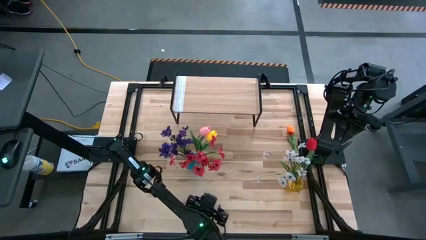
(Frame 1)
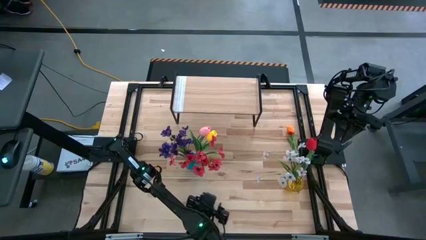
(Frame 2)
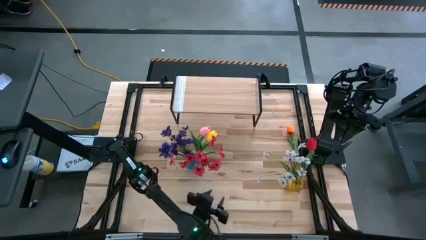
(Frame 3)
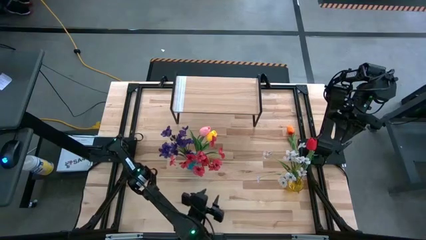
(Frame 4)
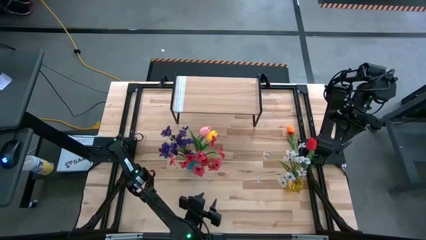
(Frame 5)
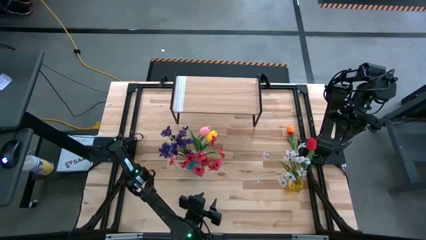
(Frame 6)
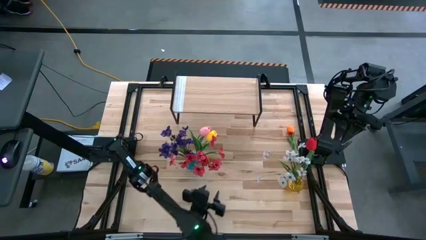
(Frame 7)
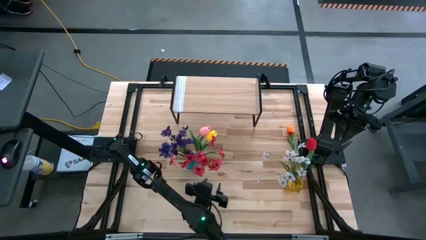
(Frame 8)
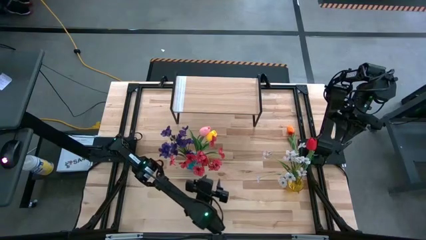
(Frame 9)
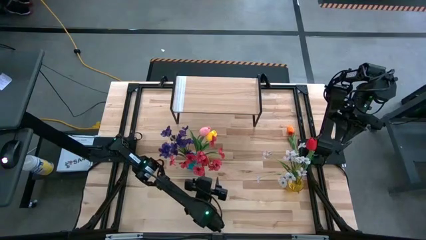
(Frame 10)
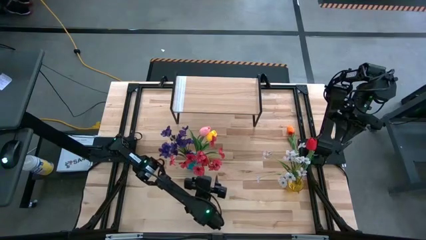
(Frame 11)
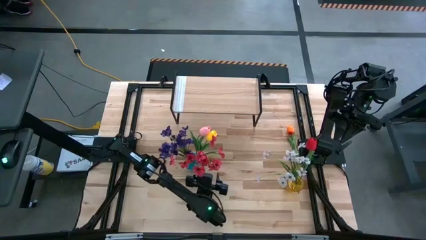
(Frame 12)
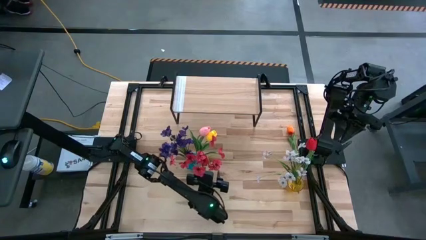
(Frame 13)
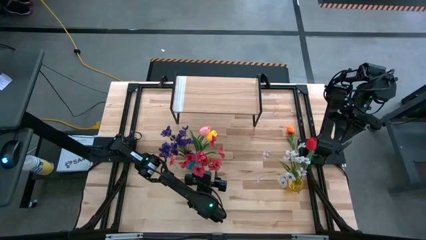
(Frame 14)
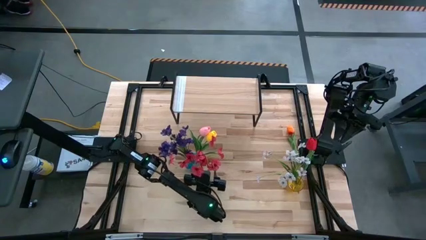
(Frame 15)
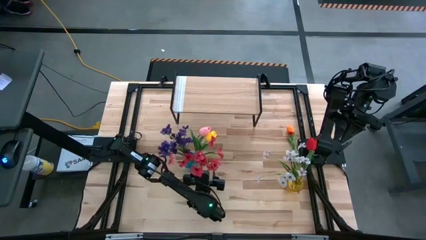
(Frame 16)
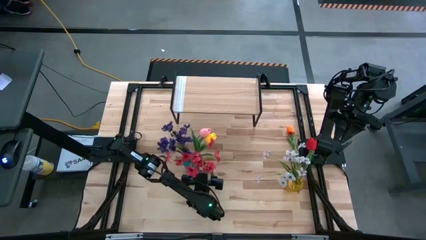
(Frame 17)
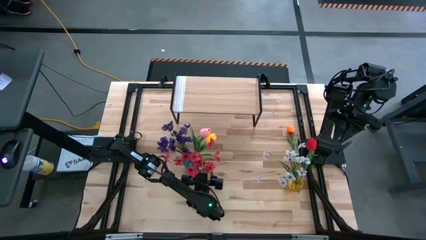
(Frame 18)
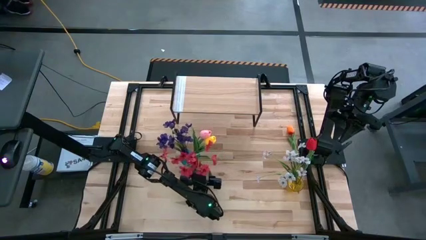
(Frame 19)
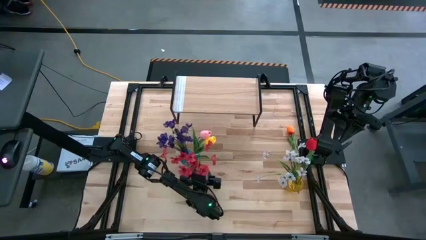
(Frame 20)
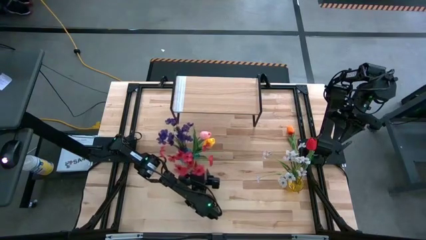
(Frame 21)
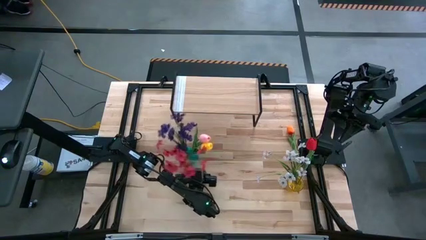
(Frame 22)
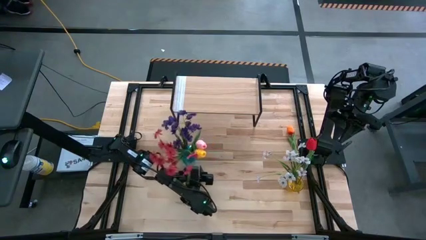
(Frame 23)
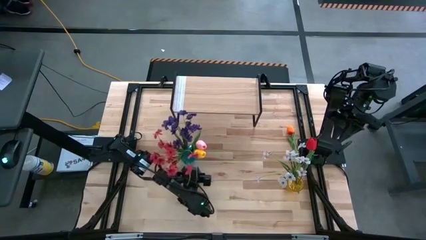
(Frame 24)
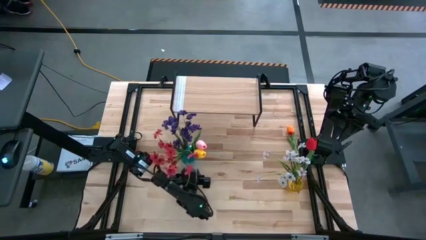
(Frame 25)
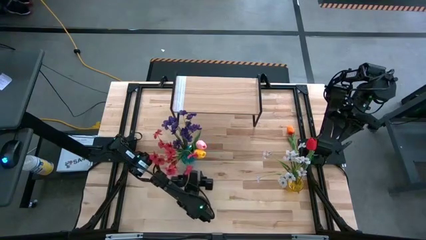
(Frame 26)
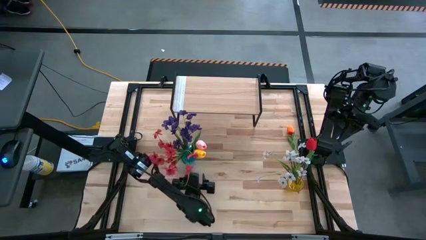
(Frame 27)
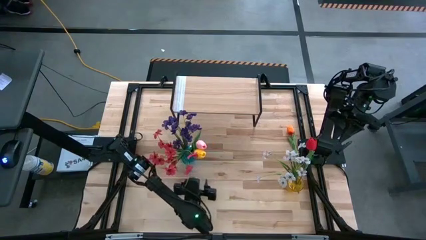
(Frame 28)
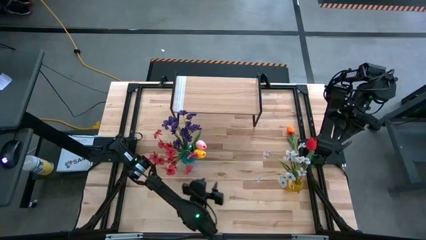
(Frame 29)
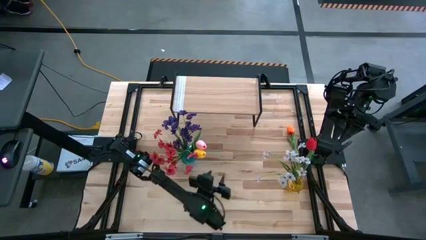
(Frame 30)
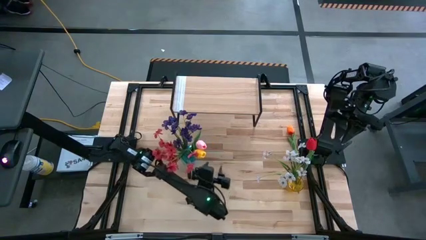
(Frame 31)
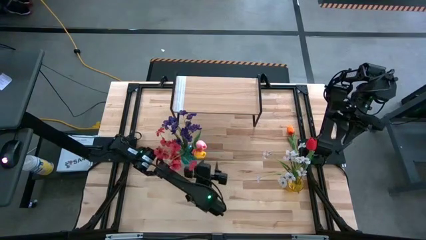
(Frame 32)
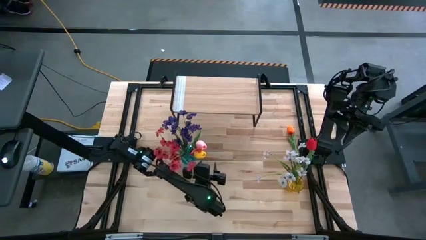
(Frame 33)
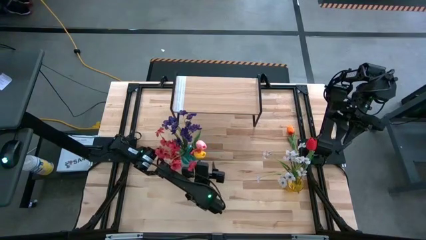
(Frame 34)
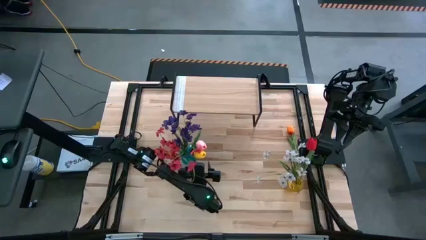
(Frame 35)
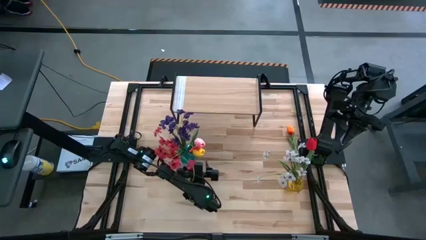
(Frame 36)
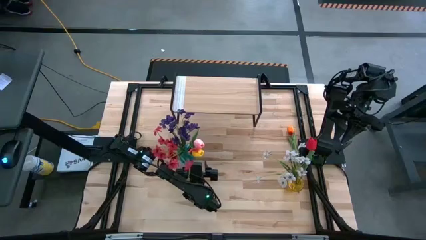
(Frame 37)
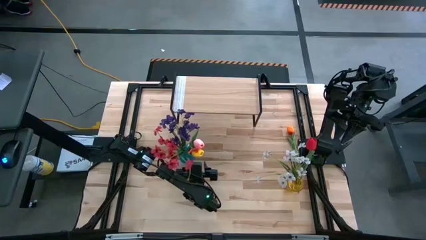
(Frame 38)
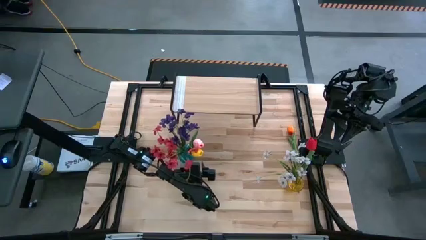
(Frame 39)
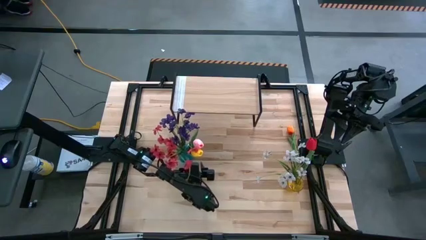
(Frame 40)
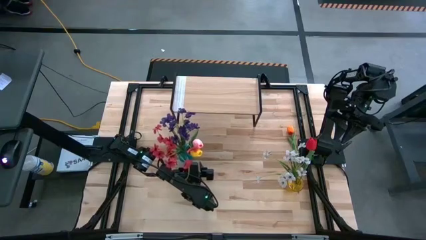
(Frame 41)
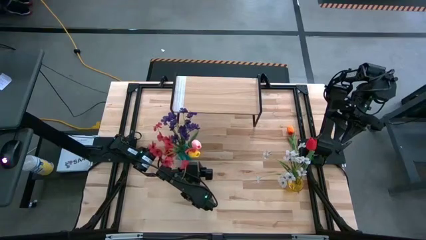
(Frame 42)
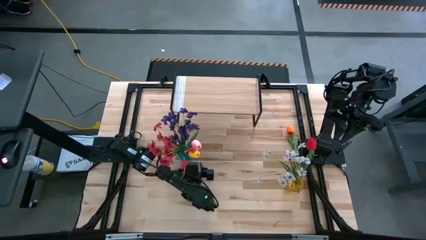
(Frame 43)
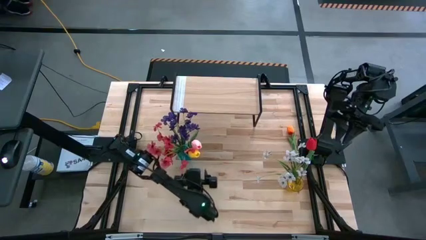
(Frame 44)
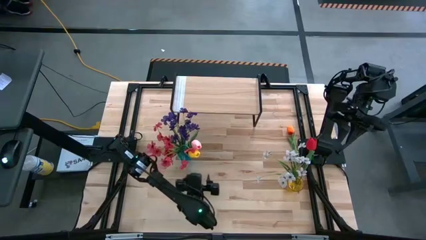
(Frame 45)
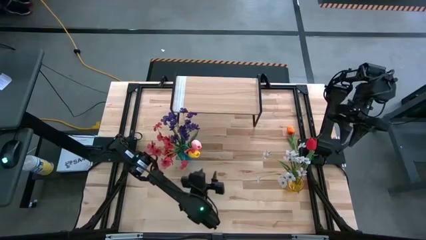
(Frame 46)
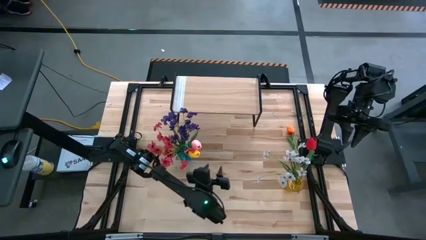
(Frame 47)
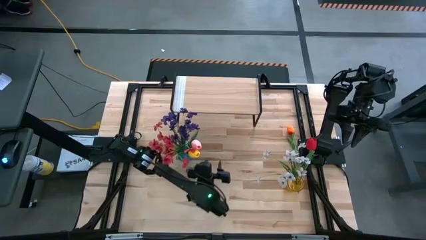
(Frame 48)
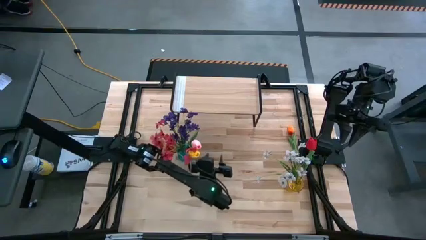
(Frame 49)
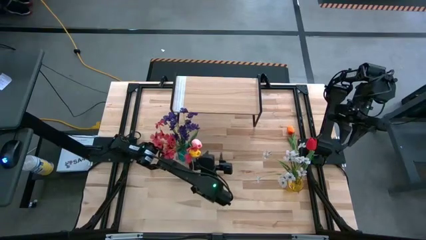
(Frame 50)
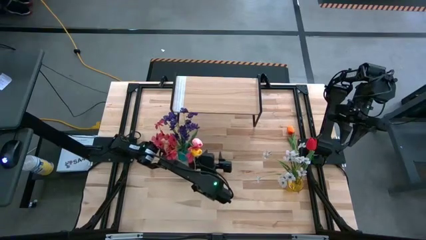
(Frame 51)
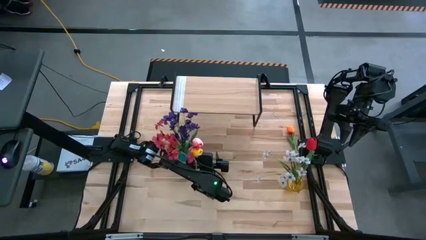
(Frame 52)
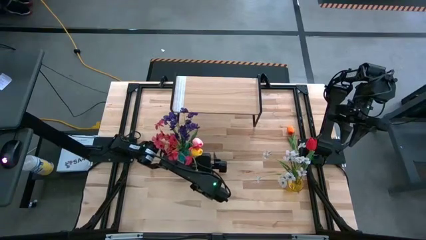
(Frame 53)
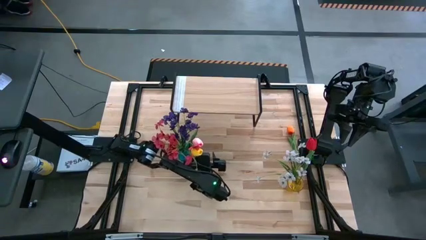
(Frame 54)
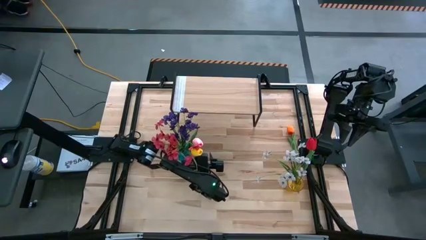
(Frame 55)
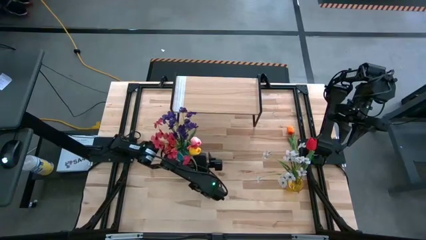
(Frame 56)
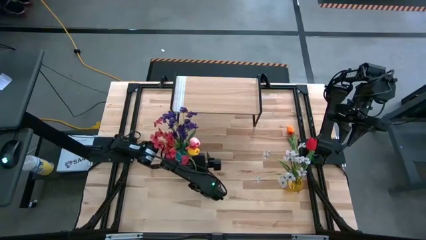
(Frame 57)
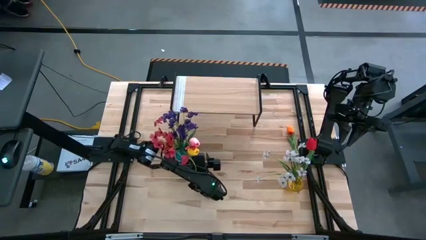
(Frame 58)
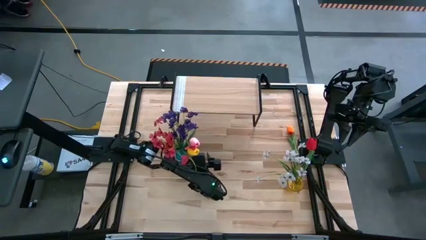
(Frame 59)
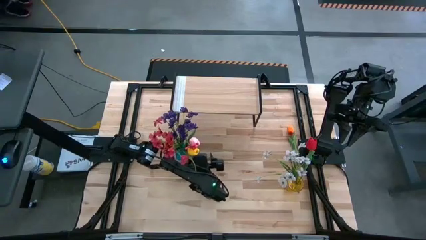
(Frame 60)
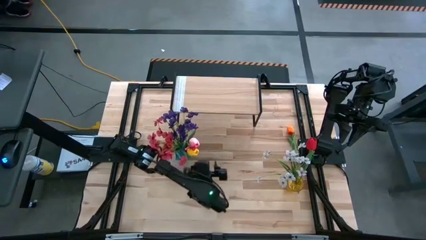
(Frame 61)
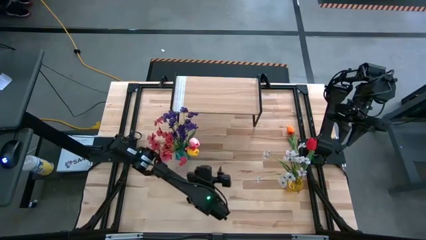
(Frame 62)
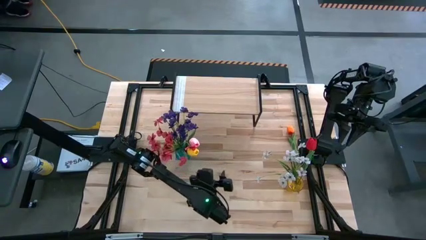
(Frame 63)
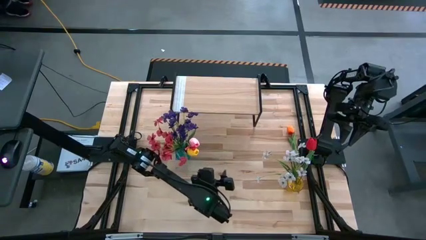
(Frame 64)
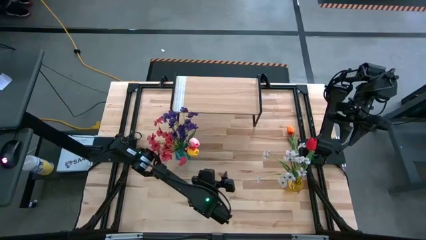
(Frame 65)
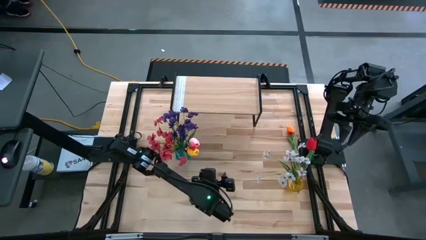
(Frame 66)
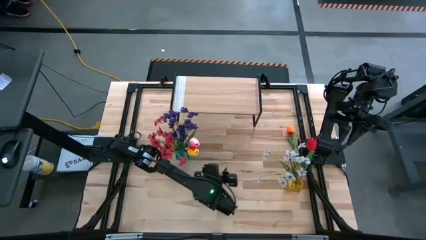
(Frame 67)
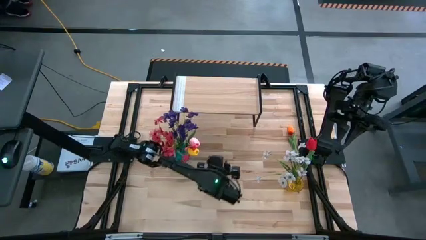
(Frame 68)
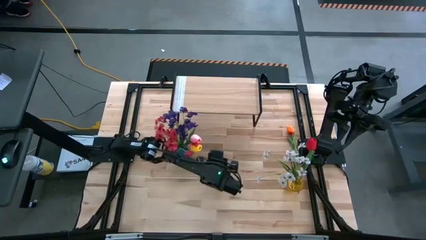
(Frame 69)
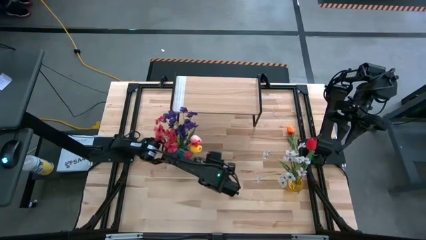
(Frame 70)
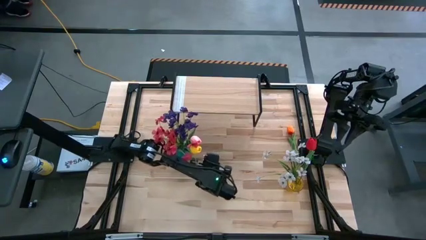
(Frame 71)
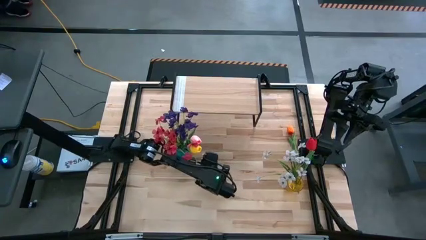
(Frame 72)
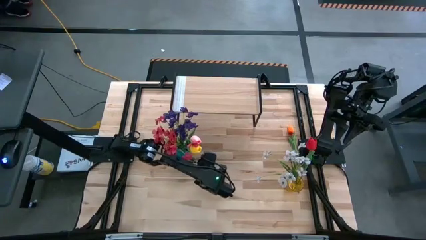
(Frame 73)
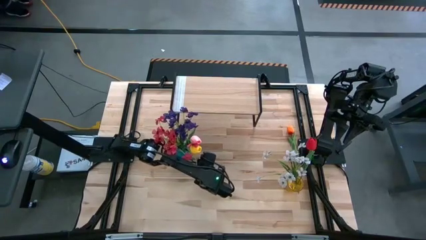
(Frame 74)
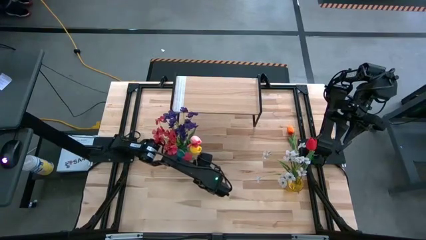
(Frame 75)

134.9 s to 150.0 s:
Task: Pick and place flowers into a vace then onto a shelf
Adjust the vases
